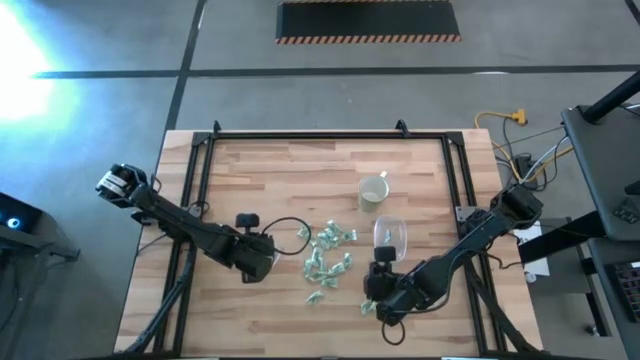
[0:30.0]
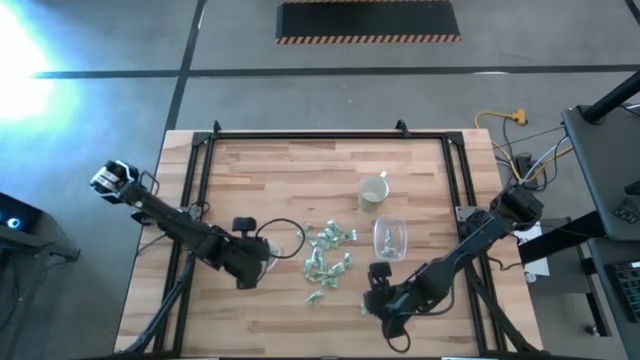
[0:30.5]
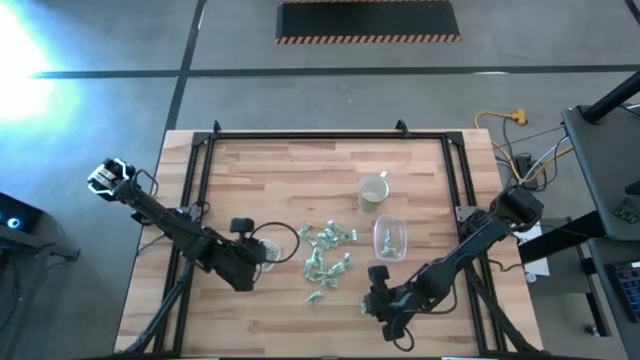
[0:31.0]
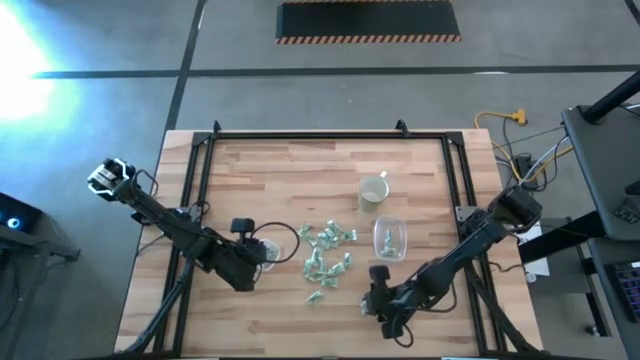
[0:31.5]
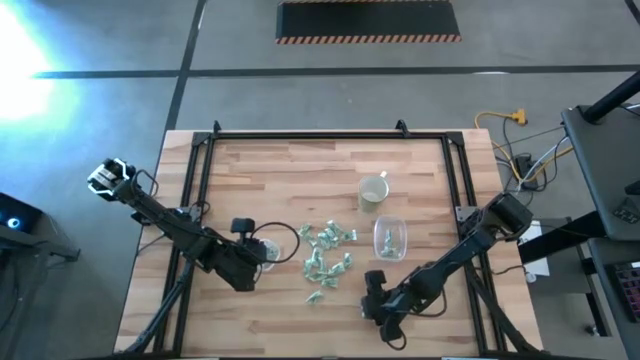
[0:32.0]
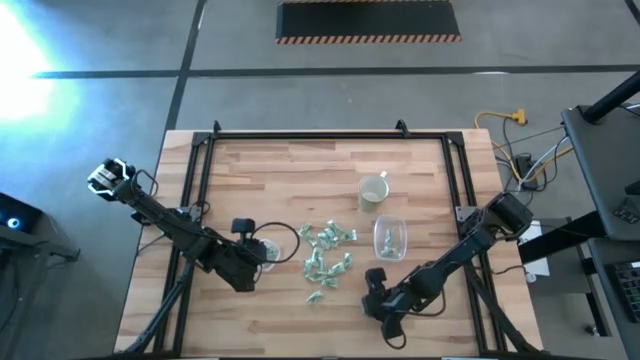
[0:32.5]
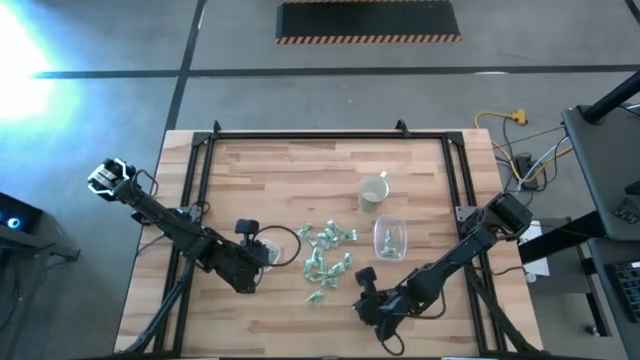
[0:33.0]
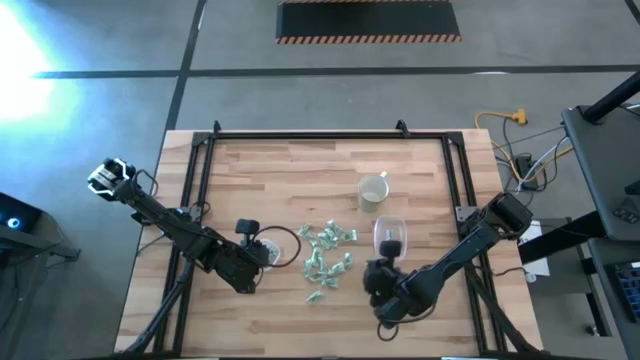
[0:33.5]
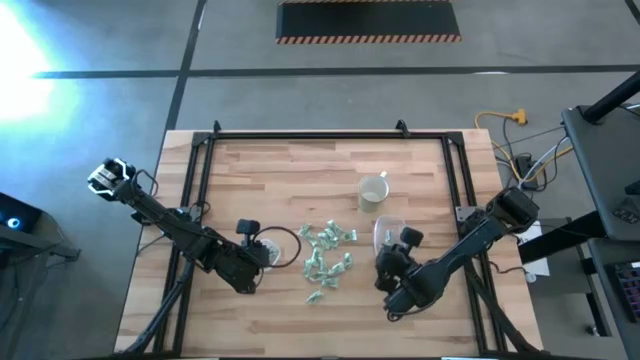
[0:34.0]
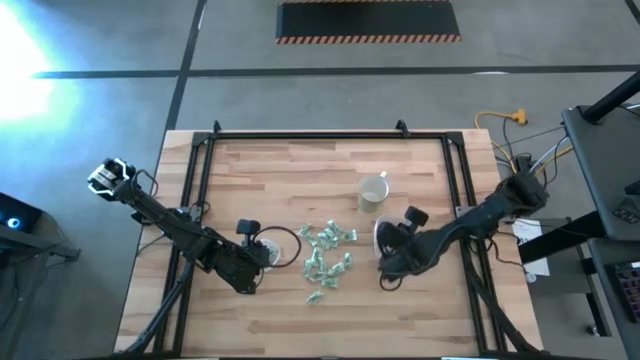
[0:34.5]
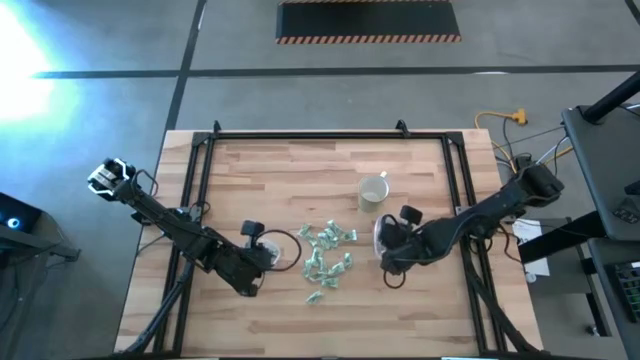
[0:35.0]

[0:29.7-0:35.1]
Task: Pick and place Stevia / Truvia into bins
Put the stevia packet into the right transparent container

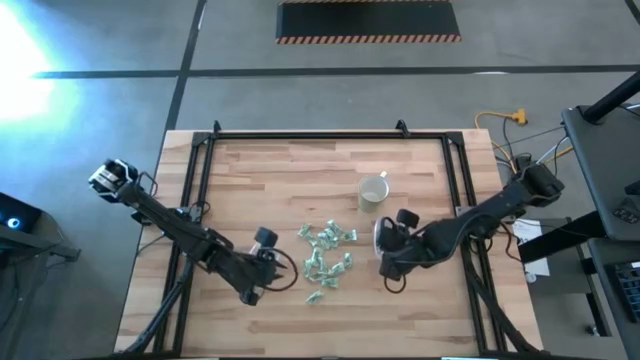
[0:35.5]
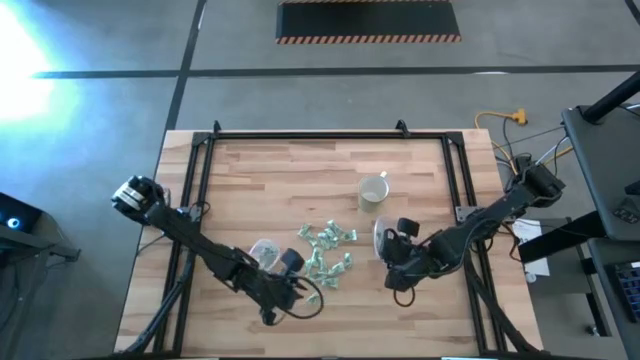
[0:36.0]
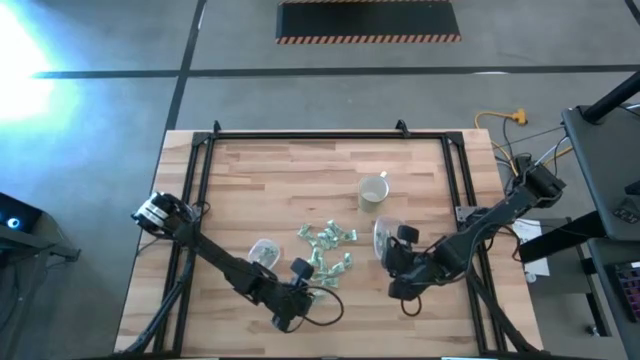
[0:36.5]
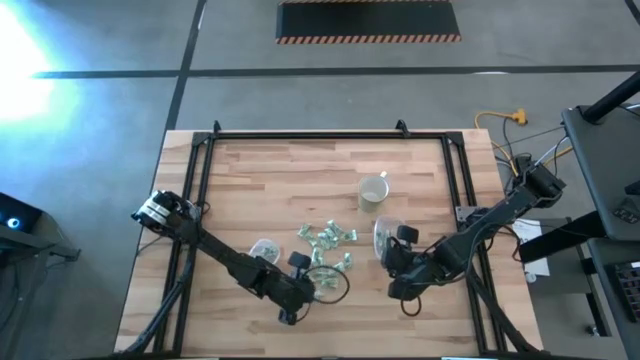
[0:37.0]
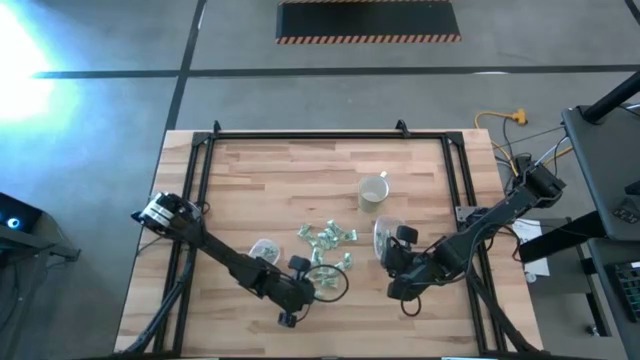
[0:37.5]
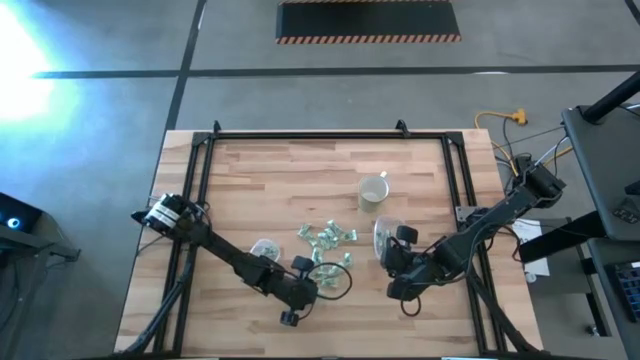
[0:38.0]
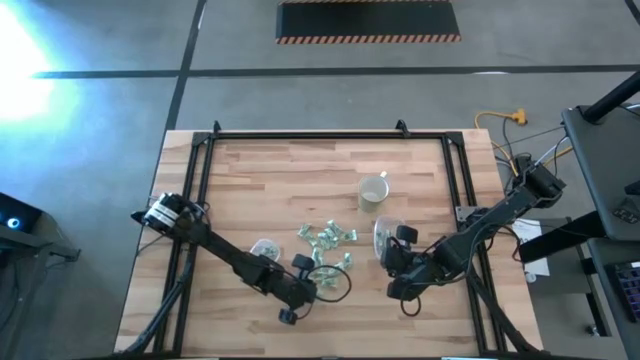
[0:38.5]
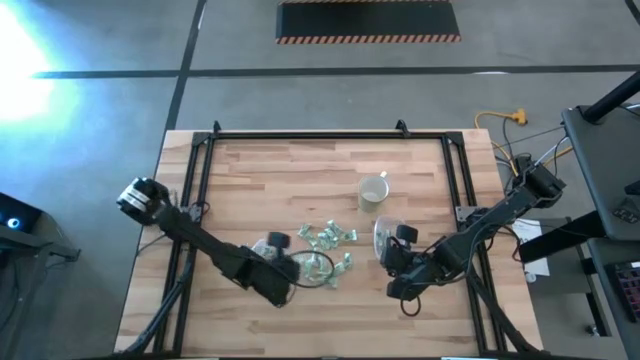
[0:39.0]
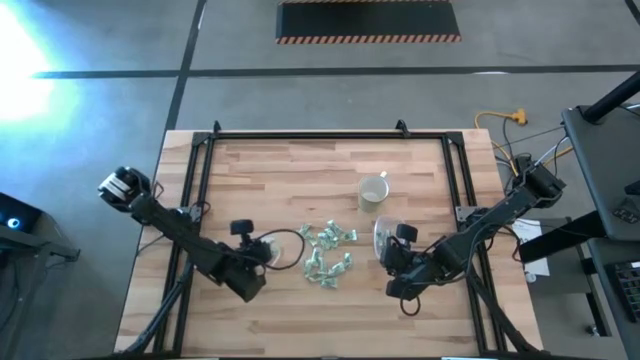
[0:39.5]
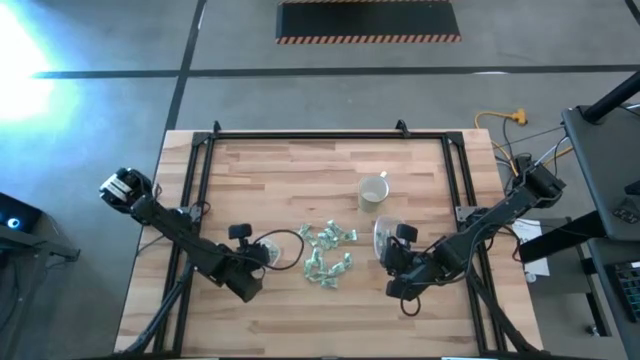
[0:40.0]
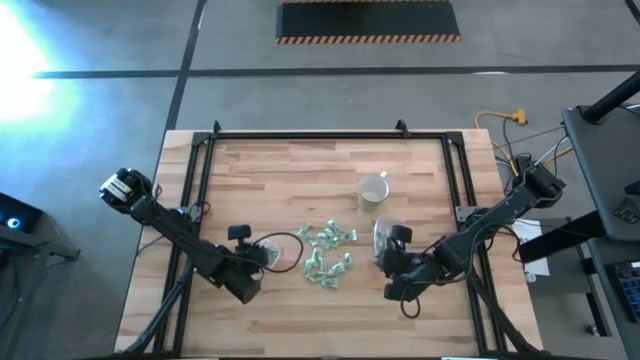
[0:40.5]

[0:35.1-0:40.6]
Put the stevia packet into the left transparent container

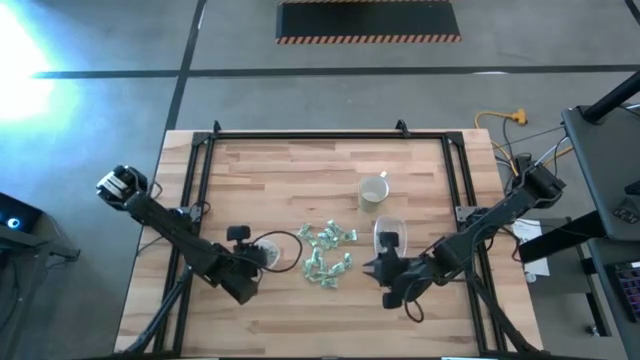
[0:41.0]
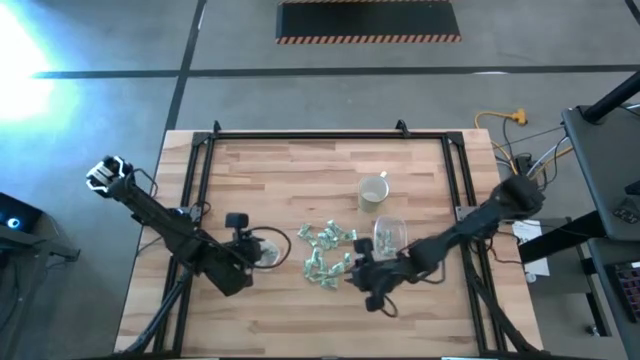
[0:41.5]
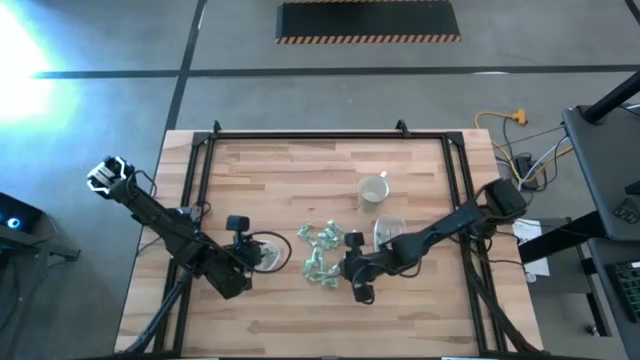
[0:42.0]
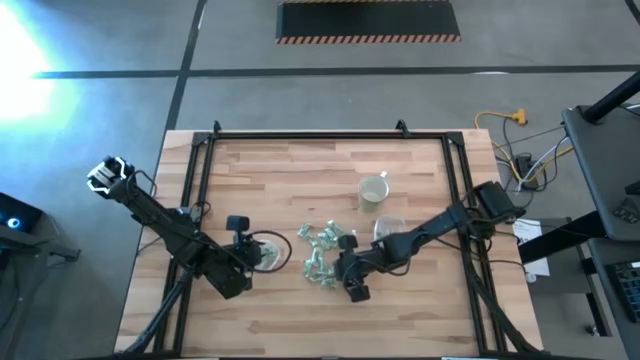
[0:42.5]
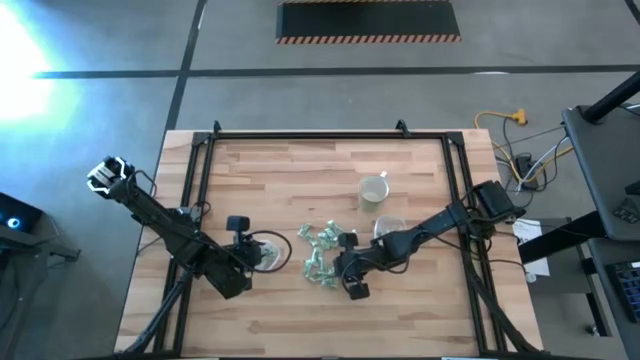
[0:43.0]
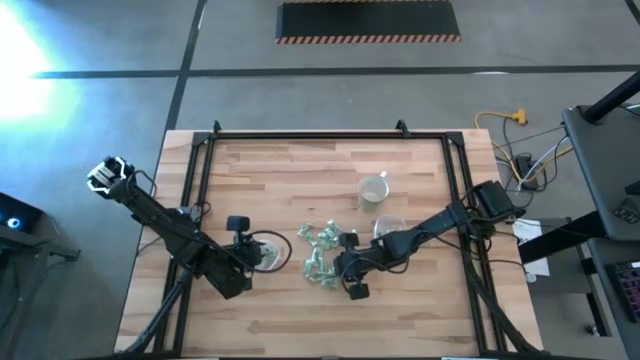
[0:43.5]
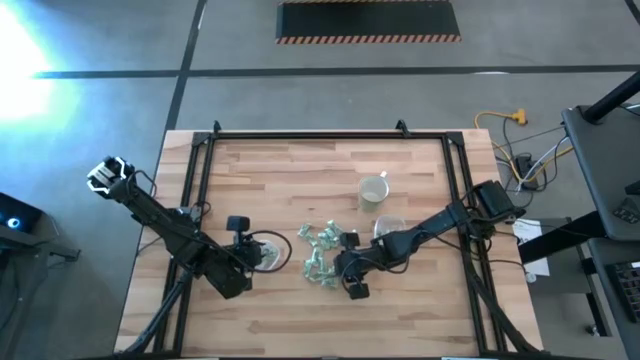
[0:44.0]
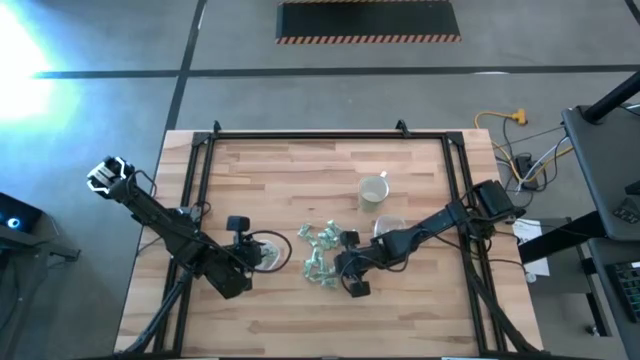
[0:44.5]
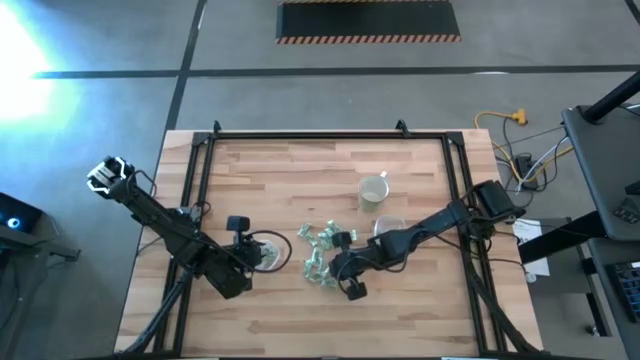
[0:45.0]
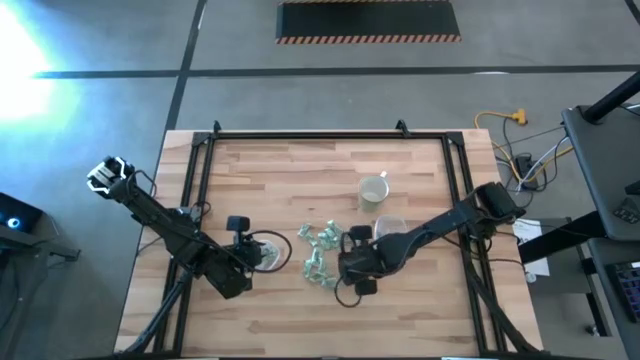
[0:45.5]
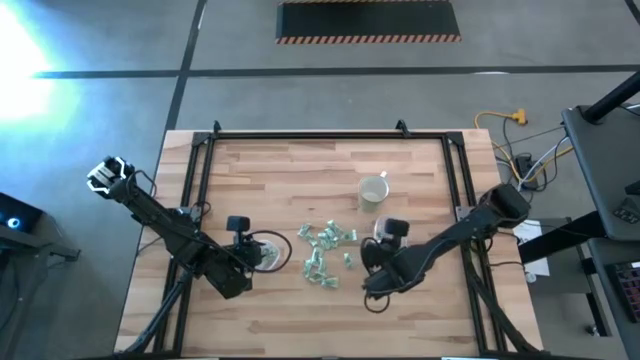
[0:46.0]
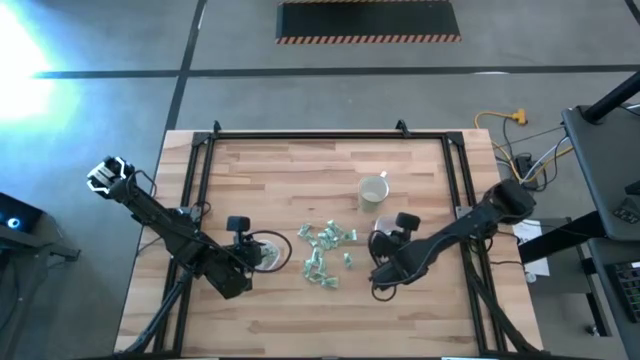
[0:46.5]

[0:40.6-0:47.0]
Put the stevia packet into the right transparent container

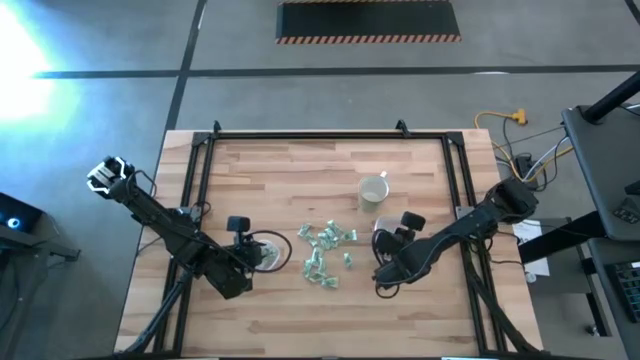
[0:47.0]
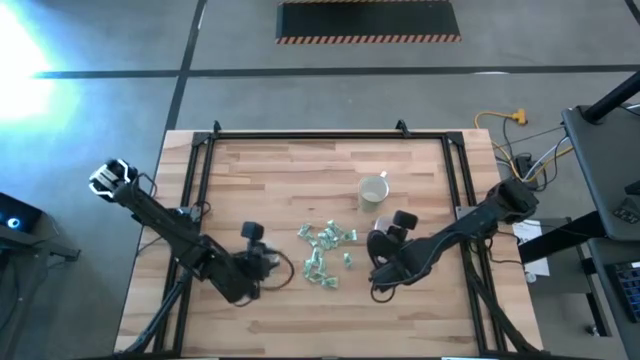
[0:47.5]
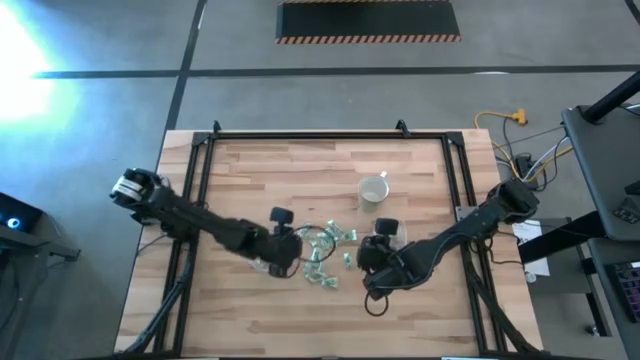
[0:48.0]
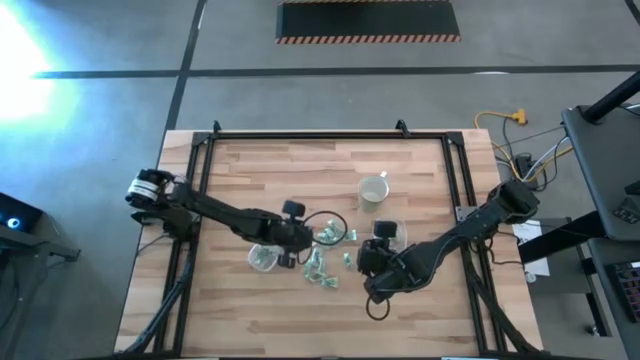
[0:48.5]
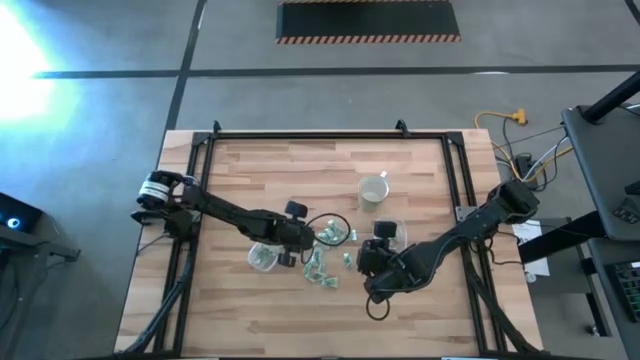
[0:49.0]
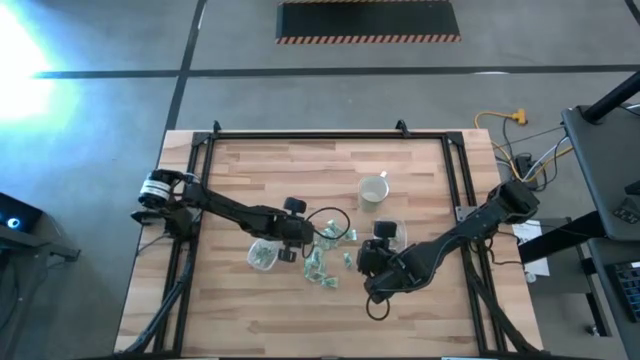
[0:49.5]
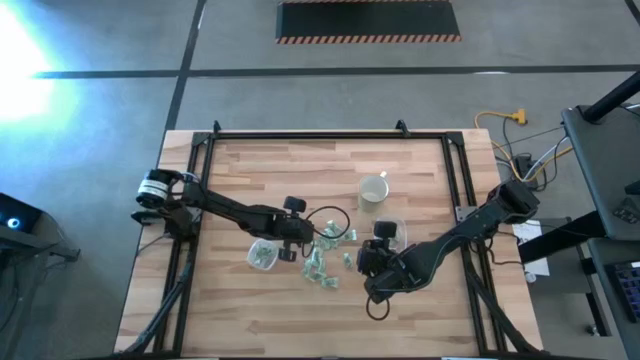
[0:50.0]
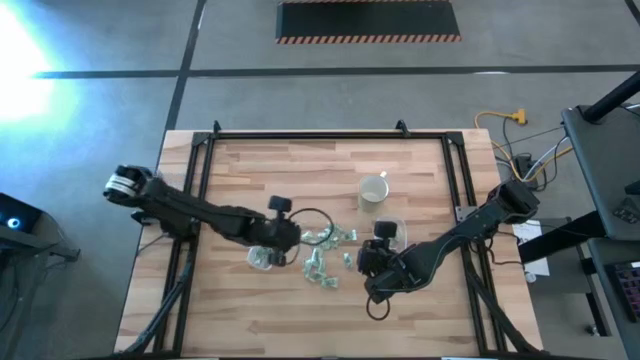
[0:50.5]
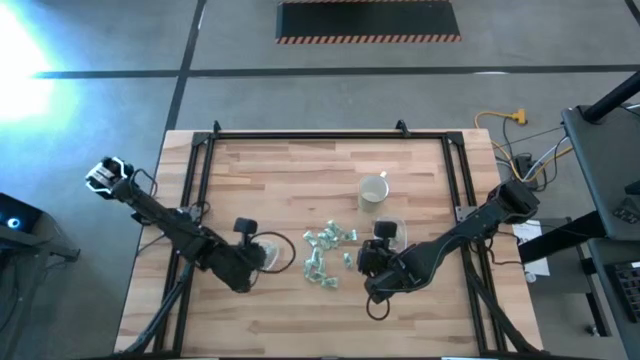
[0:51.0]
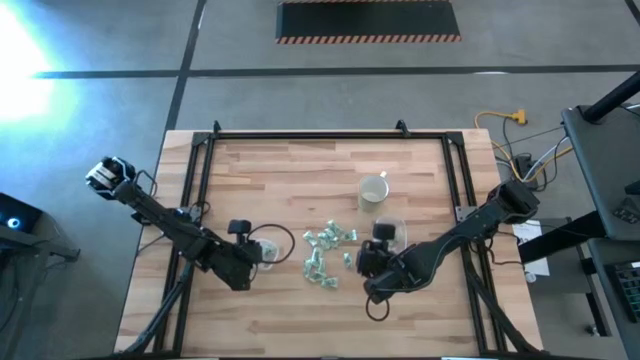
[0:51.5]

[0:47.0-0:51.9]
Put the stevia packet into the left transparent container
